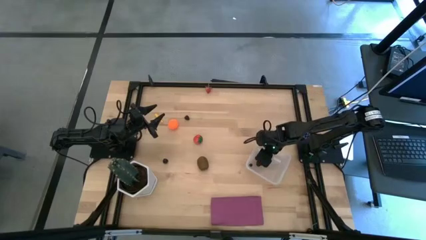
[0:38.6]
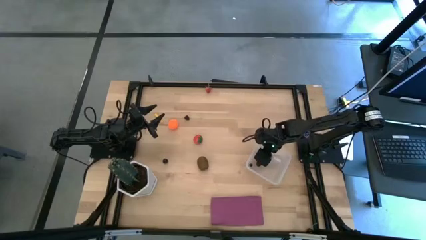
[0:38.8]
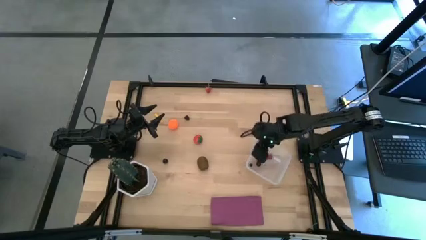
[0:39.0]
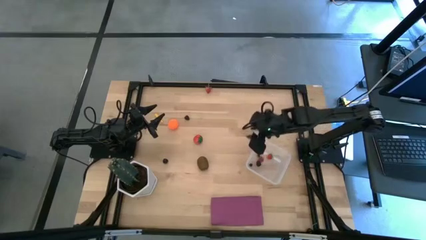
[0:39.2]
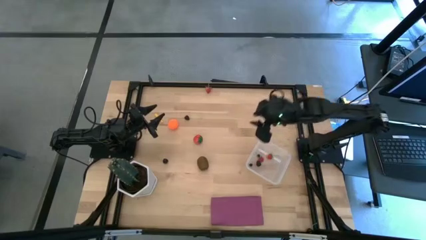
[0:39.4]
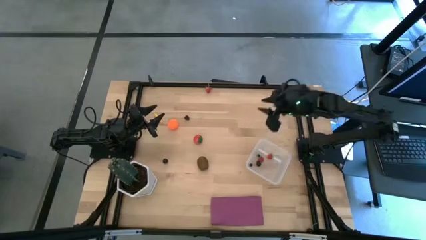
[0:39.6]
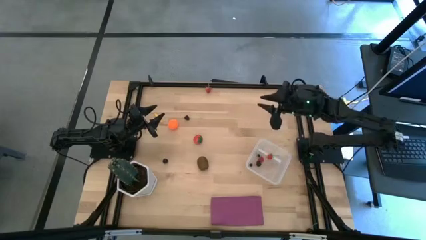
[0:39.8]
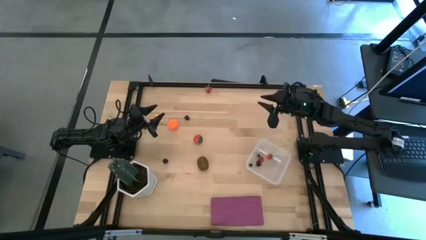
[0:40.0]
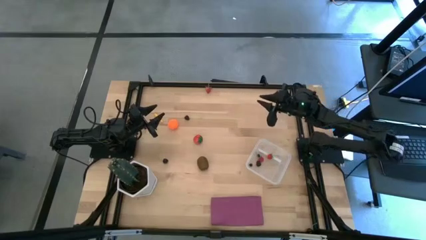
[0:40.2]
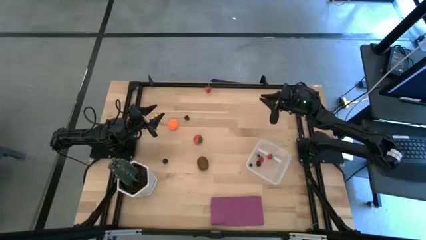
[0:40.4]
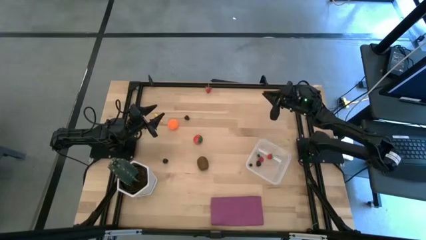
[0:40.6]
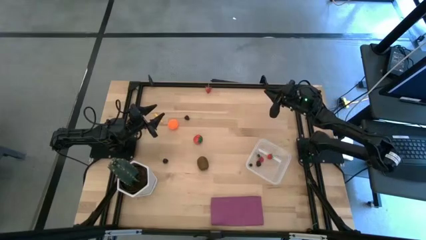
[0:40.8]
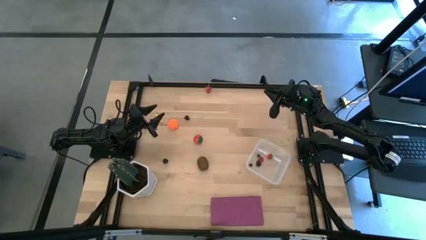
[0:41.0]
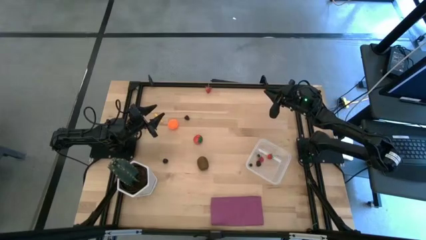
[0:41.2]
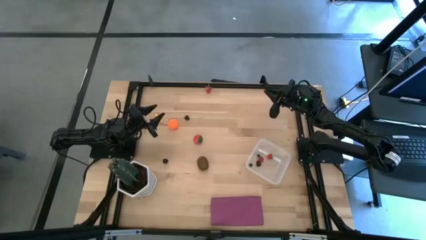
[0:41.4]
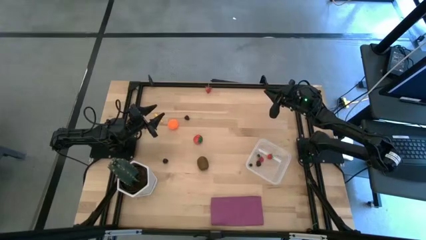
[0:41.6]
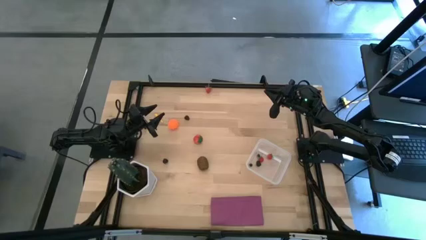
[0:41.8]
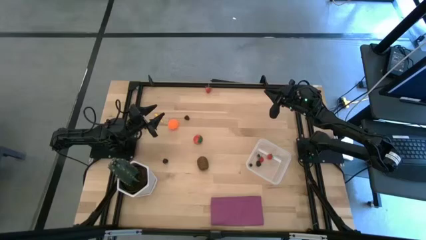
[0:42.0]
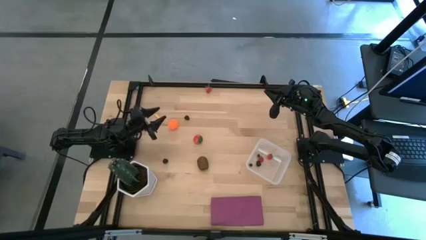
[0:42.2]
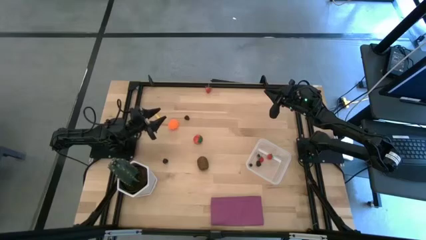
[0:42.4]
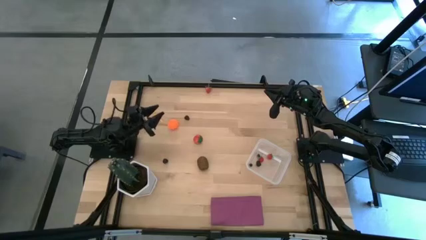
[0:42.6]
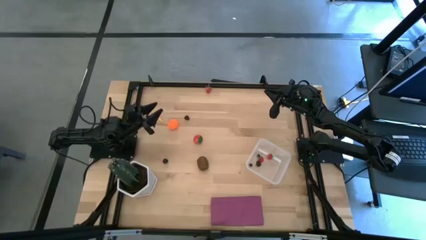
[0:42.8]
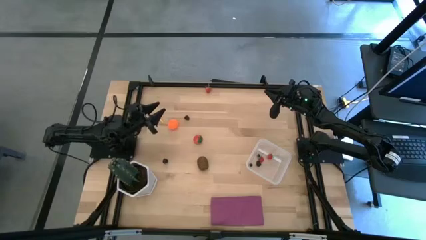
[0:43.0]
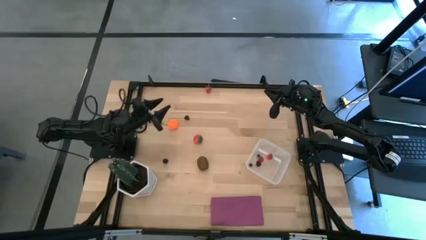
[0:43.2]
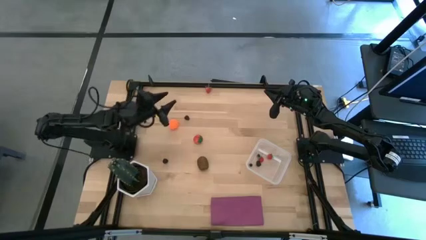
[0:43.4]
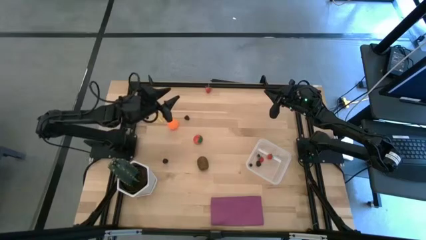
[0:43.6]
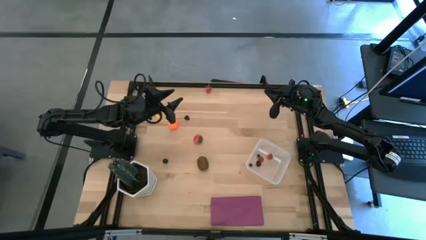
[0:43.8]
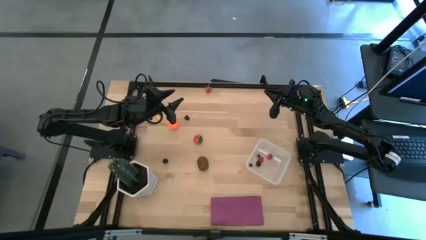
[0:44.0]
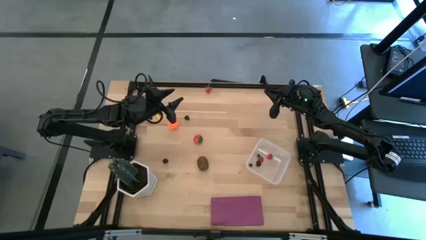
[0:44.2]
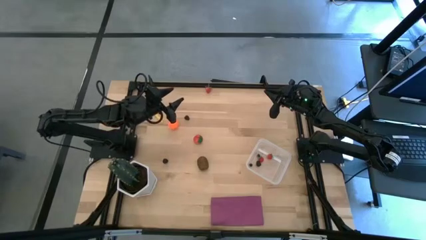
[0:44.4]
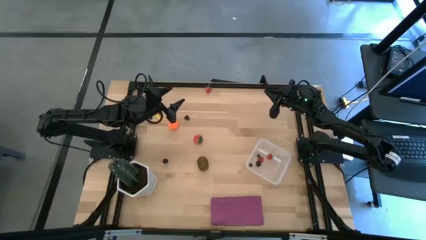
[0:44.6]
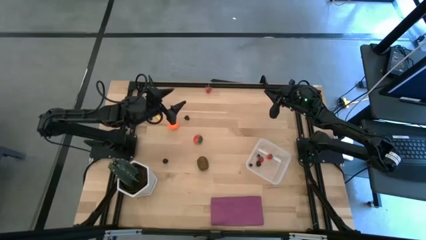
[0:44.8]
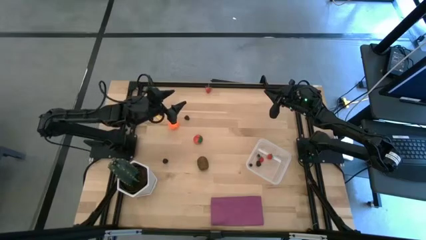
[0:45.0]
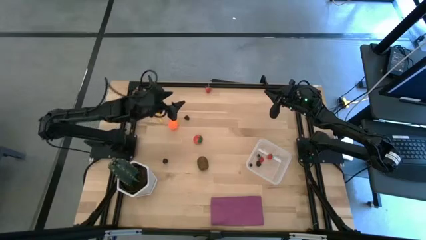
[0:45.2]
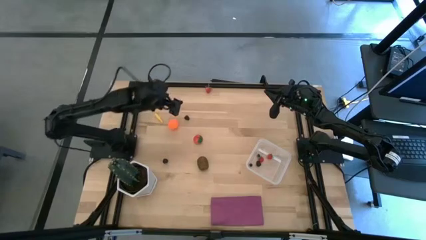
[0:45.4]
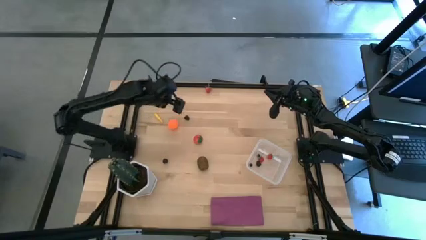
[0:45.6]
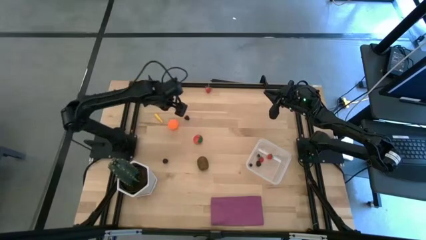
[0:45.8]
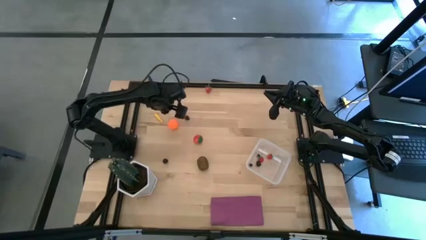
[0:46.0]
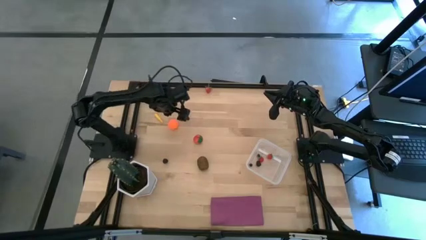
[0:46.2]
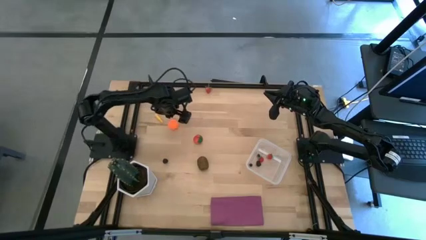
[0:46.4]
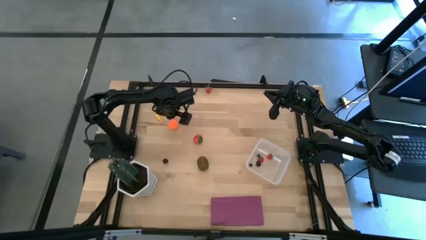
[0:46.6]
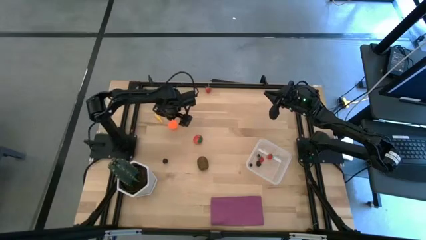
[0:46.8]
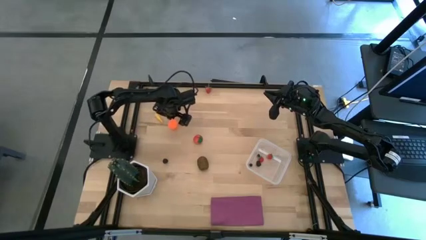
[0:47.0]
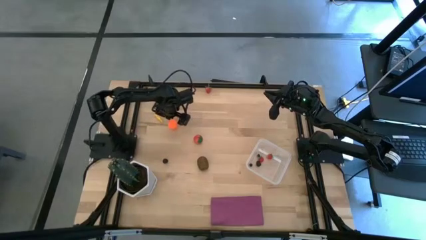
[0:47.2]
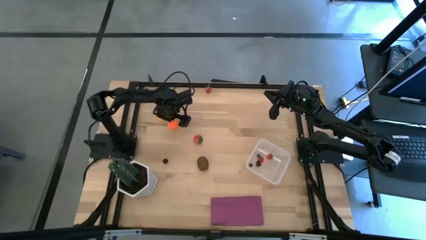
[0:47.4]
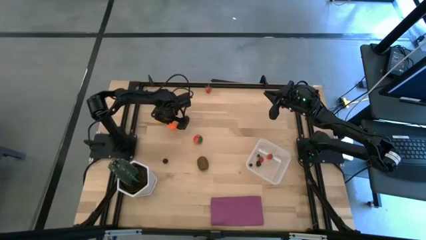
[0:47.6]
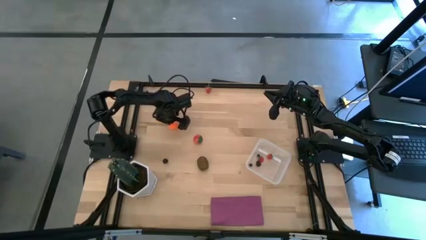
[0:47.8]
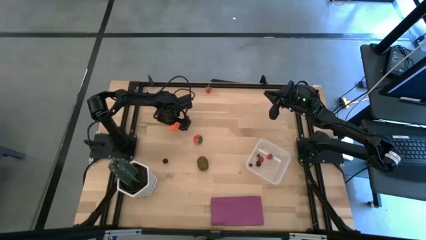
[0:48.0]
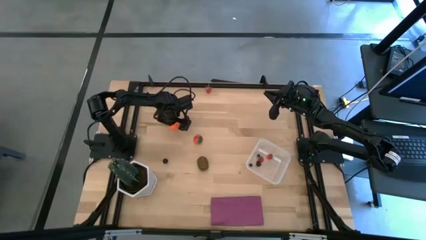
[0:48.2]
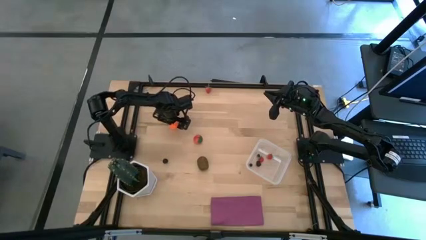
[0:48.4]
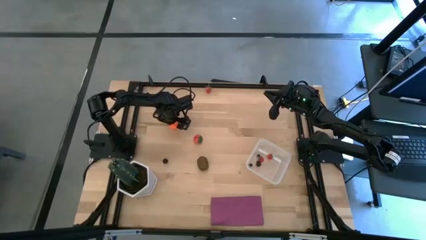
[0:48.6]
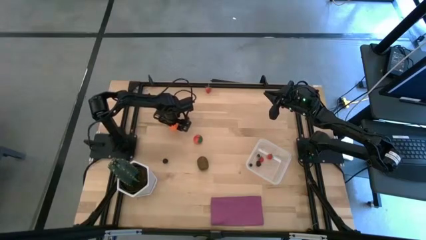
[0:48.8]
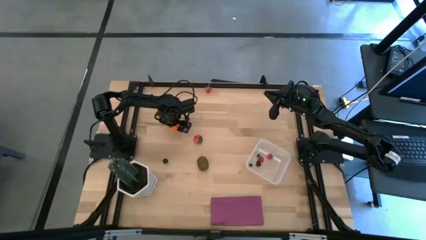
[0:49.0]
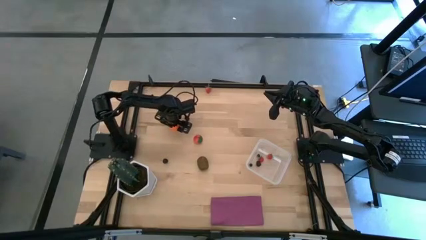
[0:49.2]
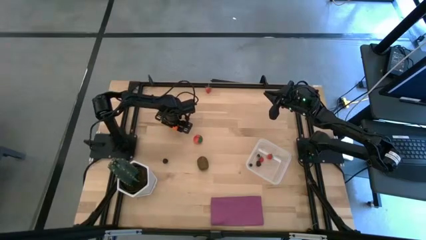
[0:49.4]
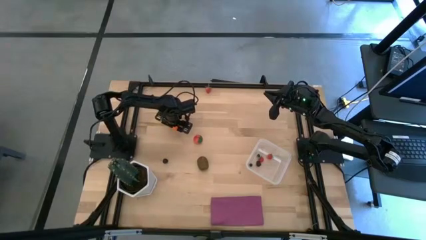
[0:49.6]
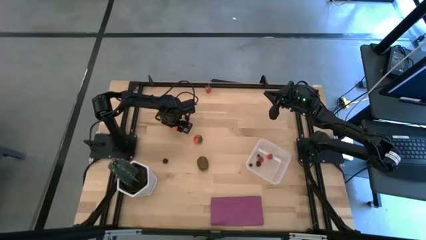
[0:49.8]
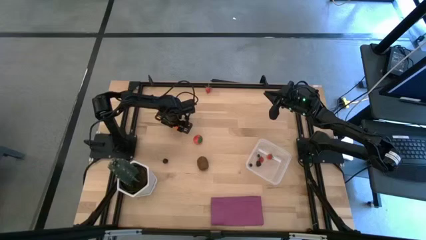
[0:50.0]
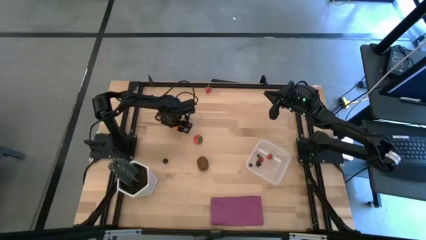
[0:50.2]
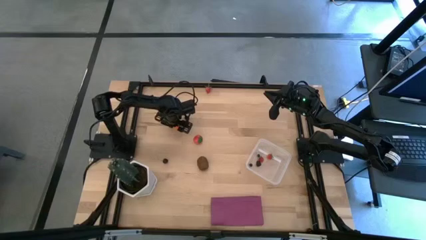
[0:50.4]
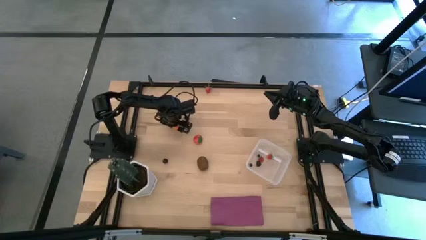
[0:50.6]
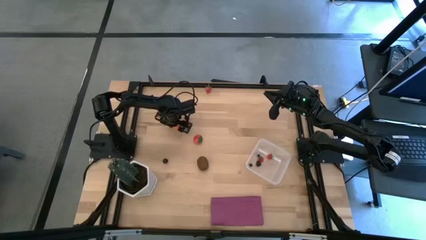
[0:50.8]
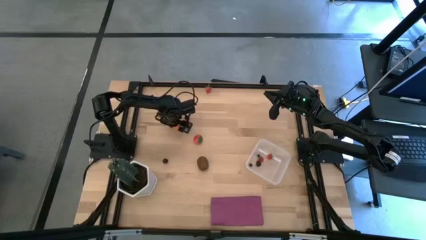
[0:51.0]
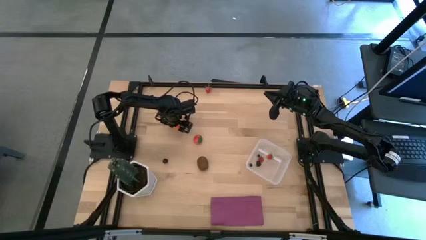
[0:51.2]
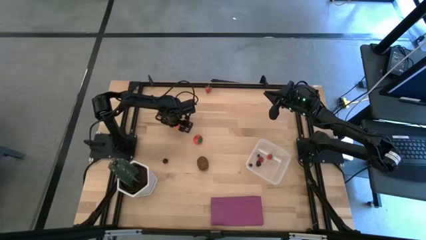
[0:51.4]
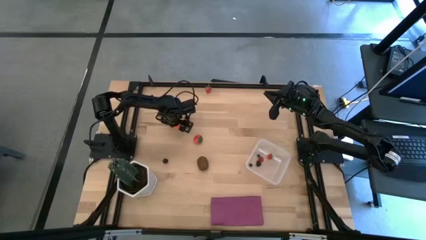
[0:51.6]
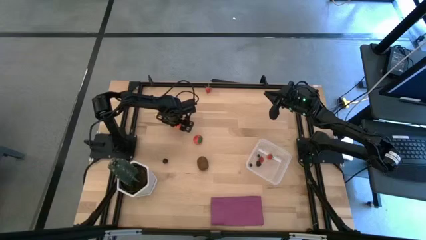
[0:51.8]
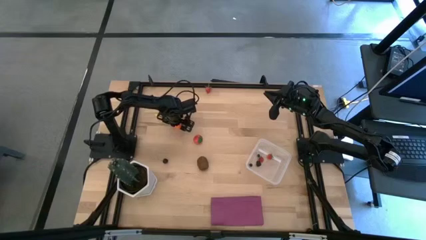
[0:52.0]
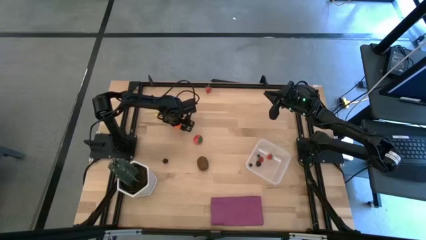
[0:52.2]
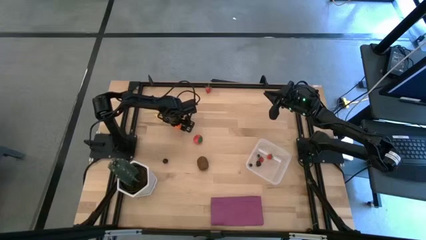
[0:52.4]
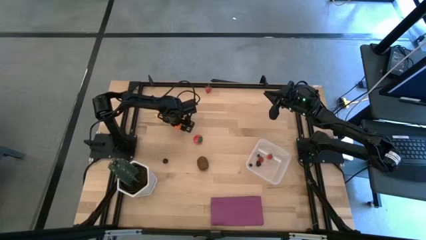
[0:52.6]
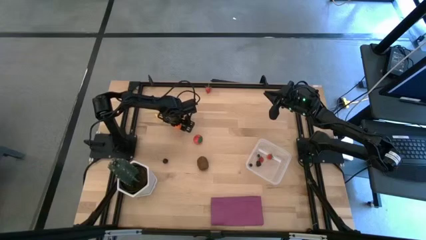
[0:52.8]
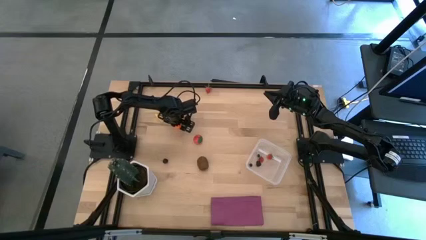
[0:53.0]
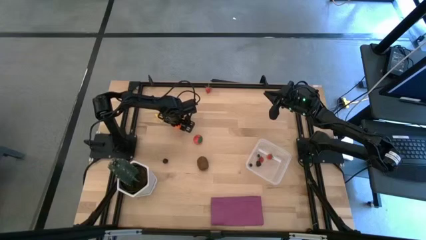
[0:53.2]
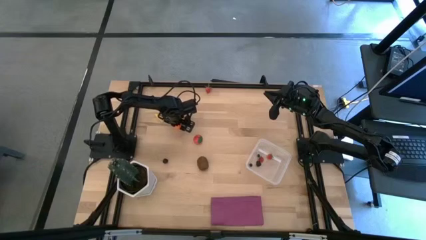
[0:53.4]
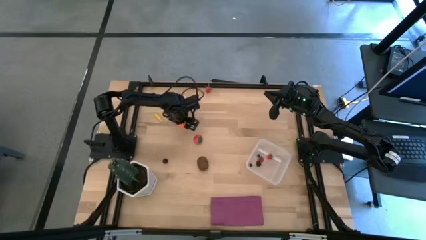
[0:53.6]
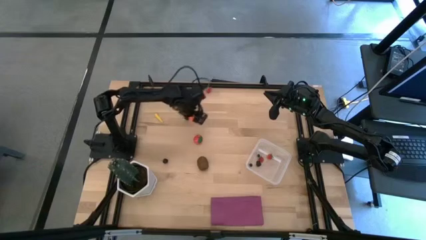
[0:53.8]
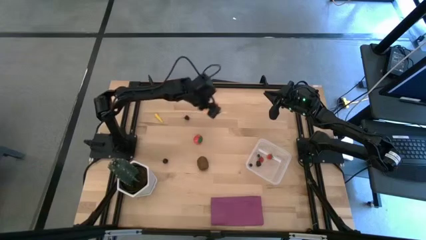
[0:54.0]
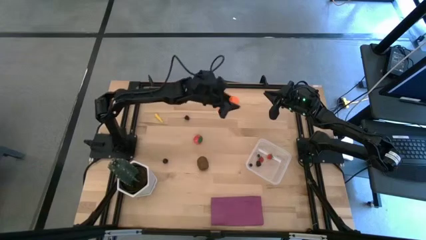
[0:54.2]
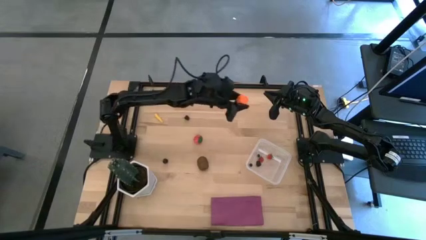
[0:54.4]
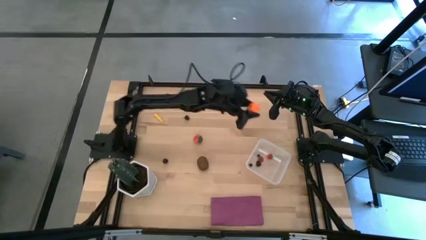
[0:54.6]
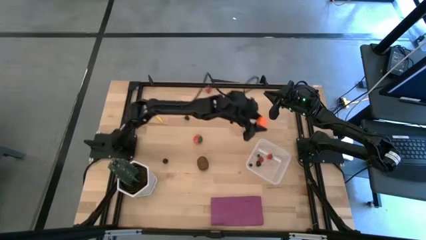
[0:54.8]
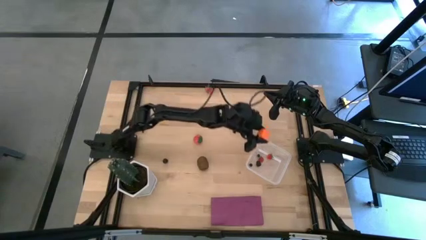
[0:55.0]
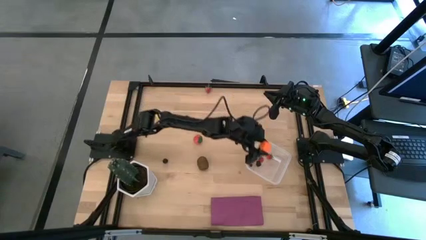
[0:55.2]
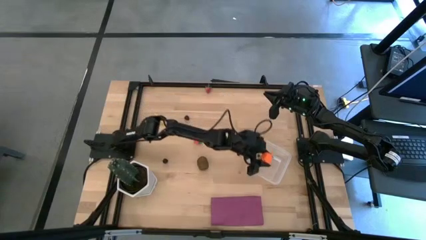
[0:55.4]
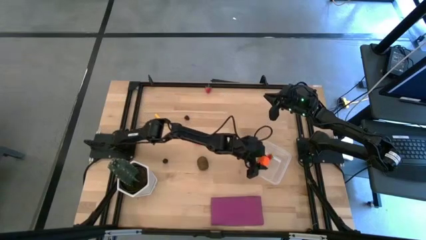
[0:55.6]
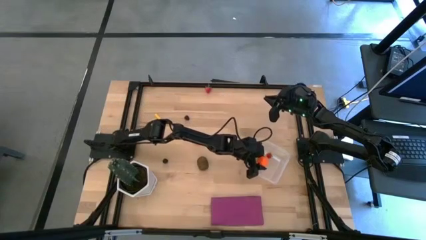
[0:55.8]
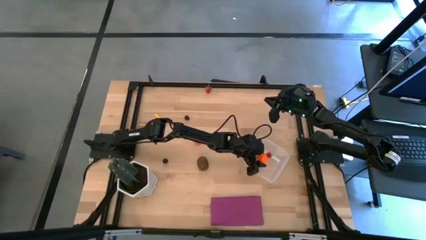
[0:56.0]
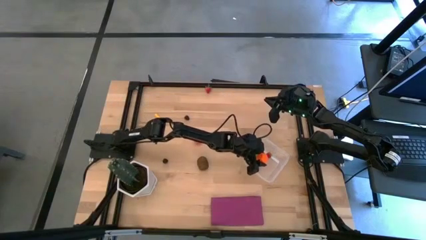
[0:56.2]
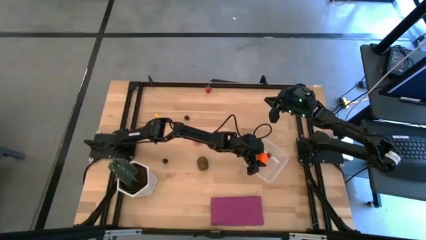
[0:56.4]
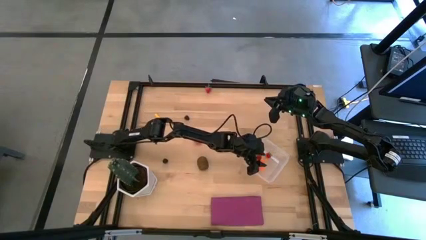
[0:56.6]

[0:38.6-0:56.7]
Task: Pick and placing Produce into tupperware
Put the pumpkin into the transparent bin
